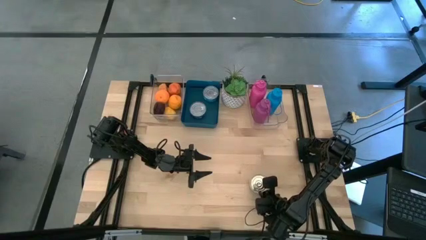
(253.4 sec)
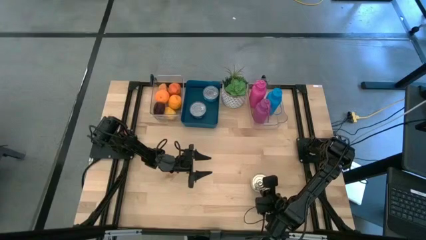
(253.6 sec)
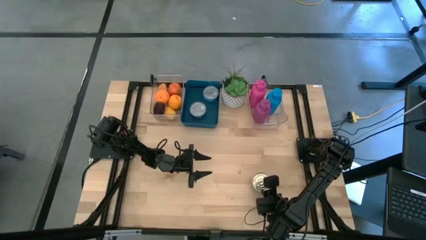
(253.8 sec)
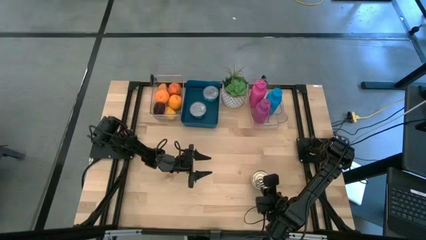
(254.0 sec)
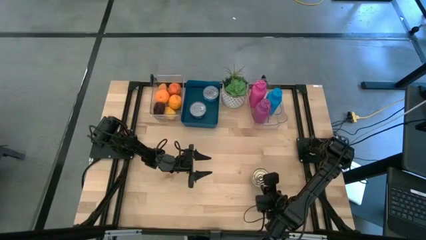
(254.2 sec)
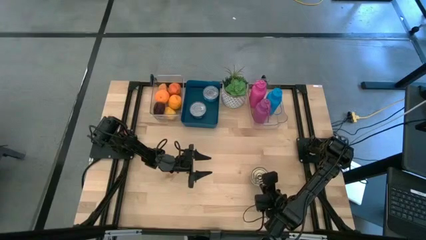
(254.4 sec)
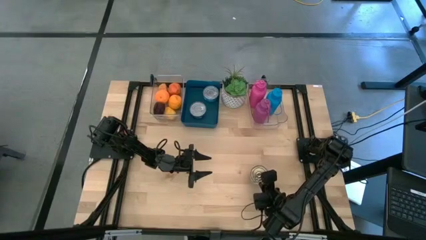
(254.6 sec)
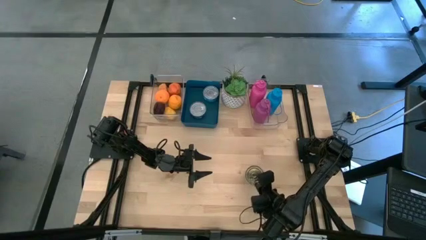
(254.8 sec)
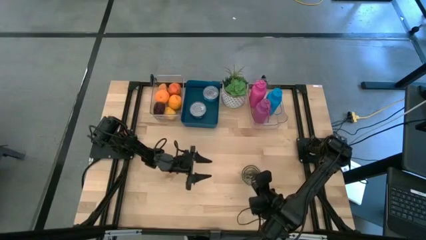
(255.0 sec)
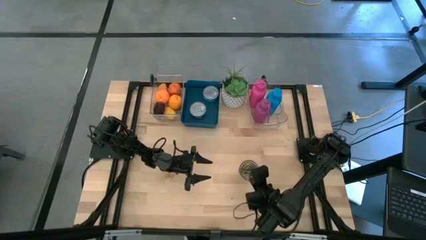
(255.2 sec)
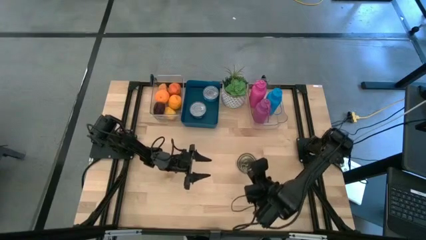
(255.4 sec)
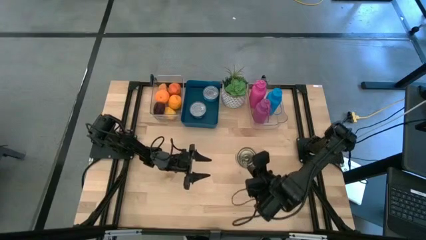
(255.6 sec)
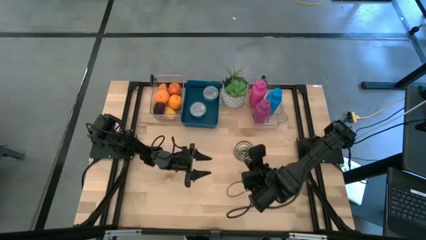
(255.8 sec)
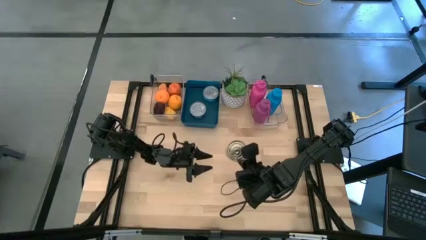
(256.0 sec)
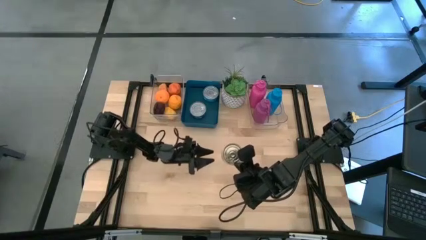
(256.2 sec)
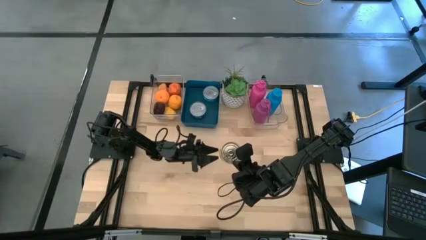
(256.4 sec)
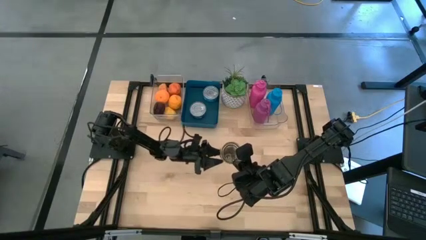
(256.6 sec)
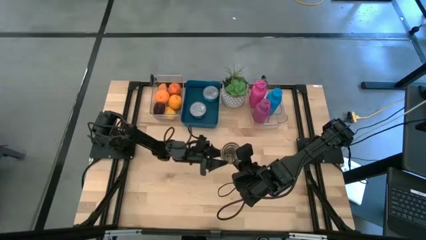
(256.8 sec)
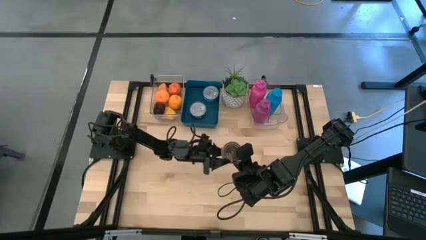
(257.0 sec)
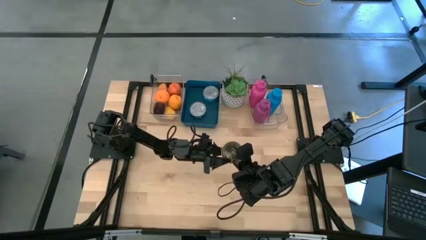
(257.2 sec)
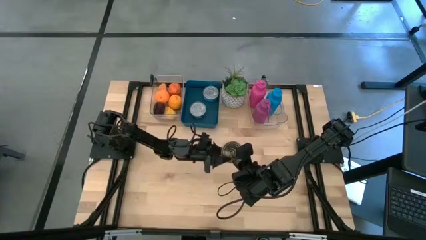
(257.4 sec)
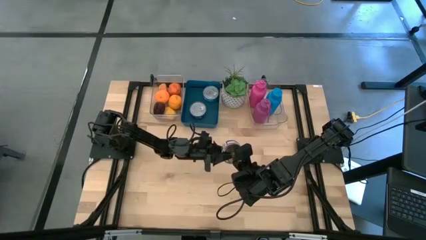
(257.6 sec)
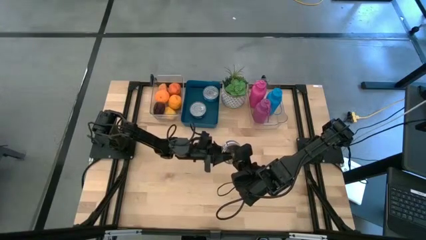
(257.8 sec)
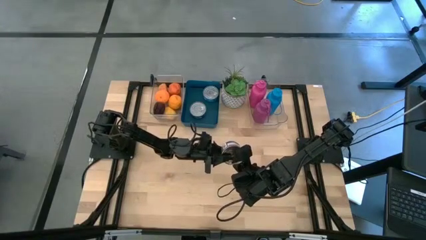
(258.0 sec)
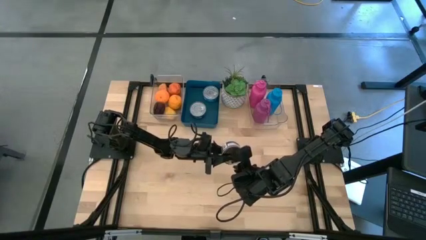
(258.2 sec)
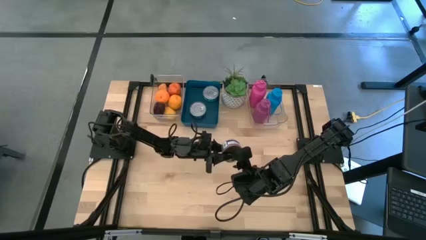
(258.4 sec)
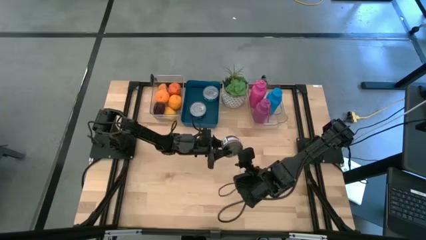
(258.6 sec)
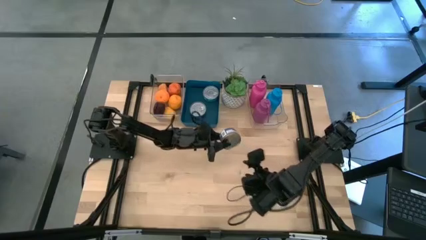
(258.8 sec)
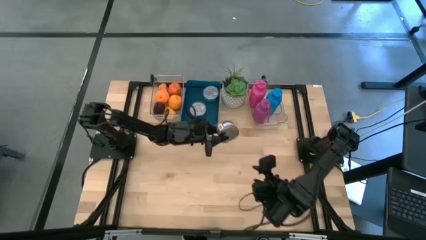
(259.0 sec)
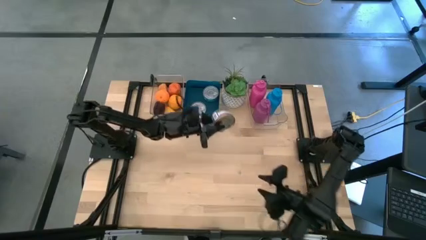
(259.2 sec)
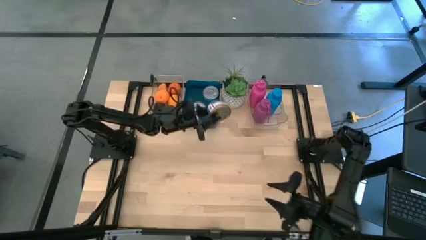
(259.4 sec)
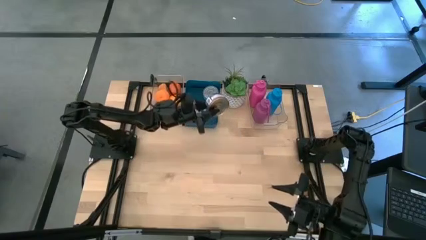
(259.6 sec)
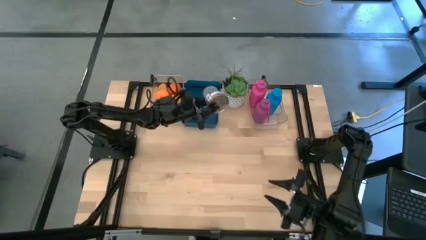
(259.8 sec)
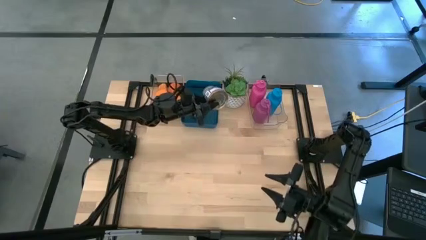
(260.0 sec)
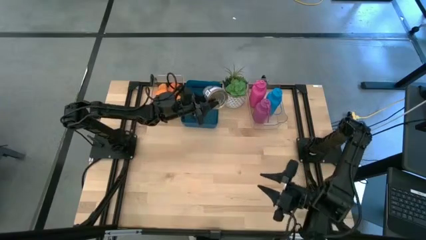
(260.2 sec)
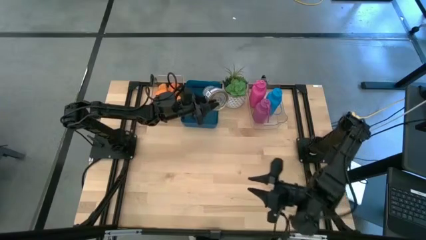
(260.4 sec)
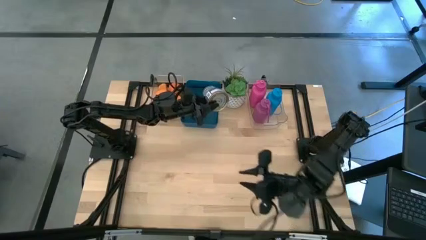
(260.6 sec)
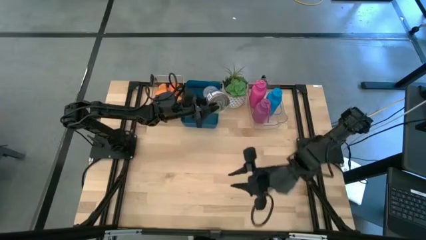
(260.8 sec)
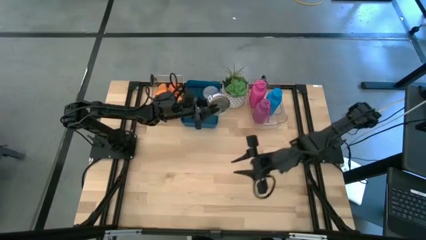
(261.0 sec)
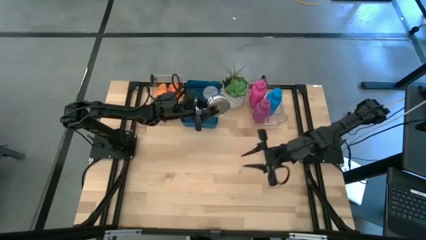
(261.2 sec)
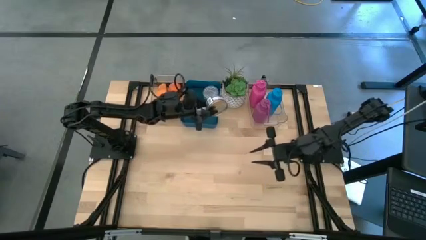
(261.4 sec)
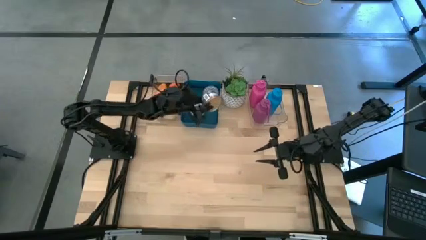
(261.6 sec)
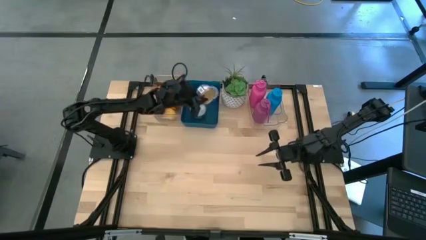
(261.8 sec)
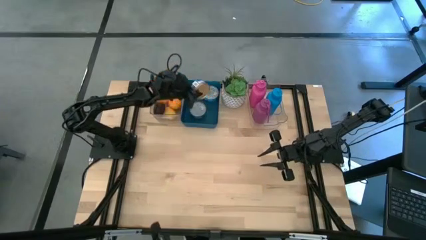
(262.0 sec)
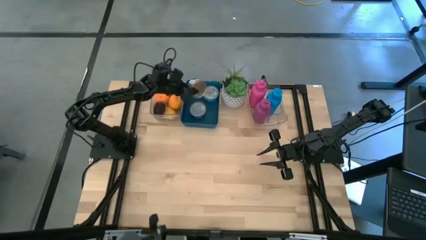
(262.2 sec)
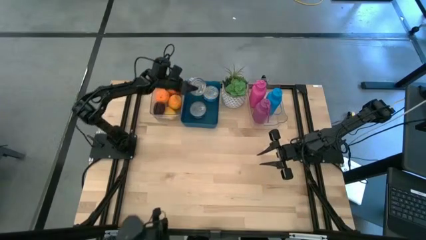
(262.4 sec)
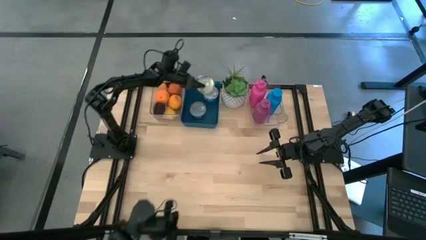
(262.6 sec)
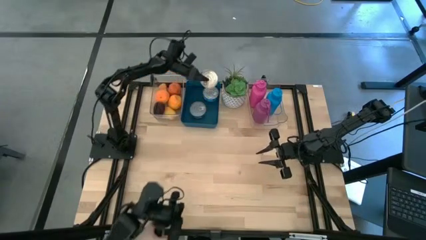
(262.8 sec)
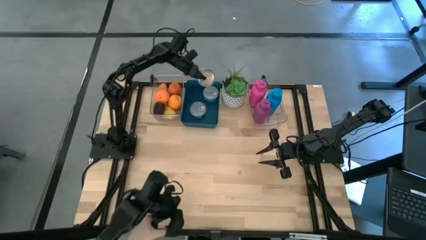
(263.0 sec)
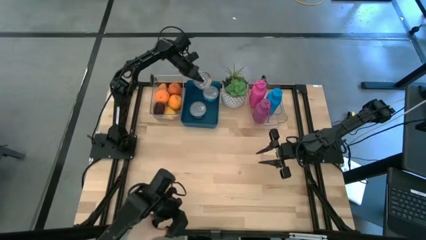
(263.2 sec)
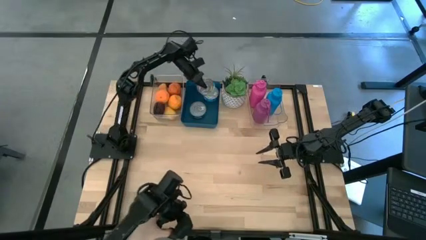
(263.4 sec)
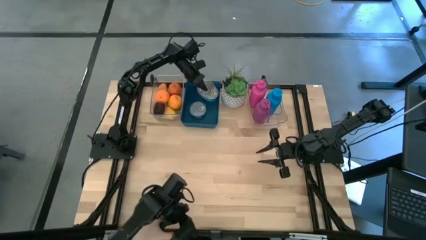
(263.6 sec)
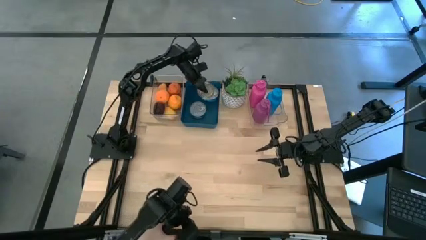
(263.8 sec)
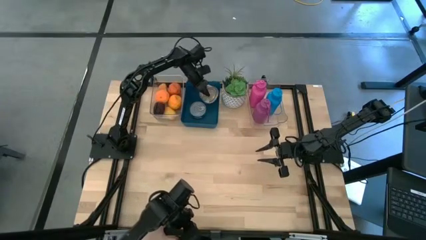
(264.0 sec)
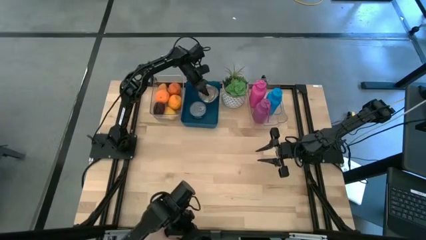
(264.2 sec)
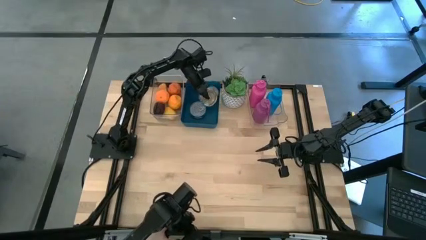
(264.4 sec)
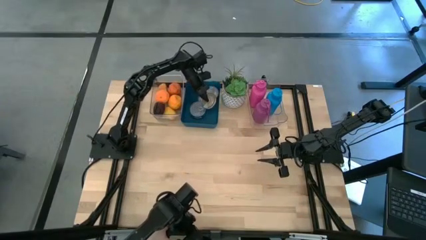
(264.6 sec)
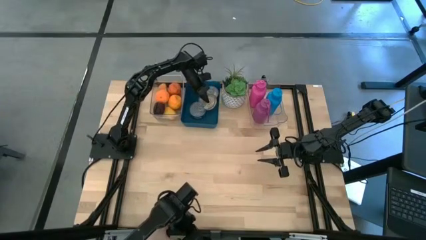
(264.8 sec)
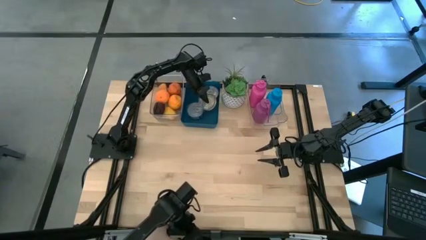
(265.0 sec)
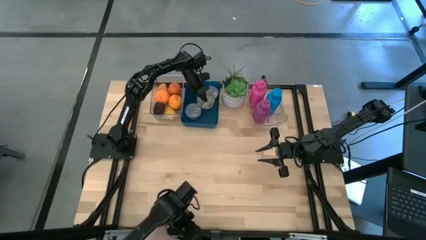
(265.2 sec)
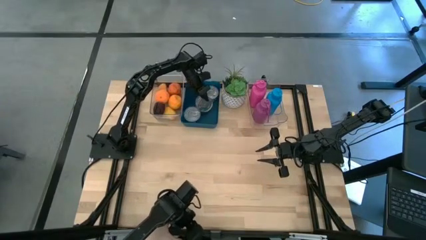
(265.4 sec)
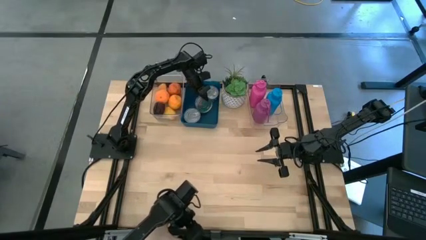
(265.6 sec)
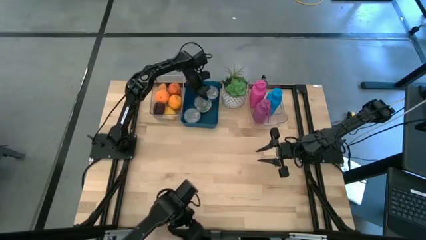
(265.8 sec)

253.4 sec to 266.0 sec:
Task: Pick & Place Food Item
Put the blue and pink tuna can into the blue bin

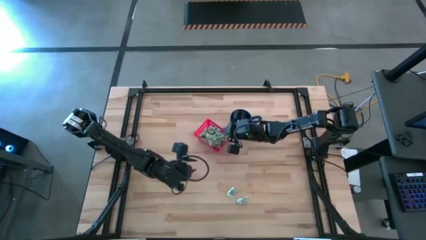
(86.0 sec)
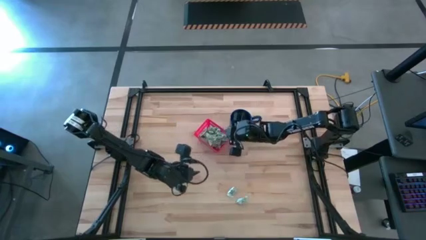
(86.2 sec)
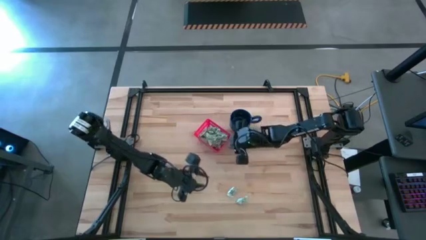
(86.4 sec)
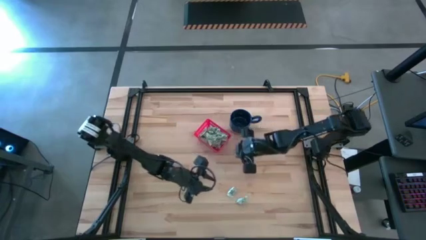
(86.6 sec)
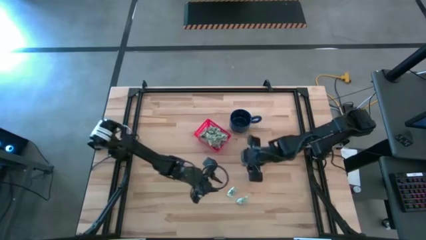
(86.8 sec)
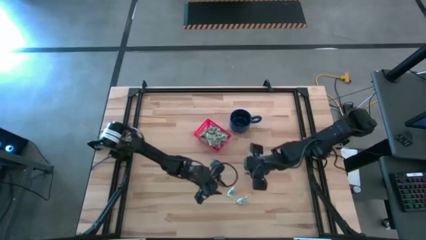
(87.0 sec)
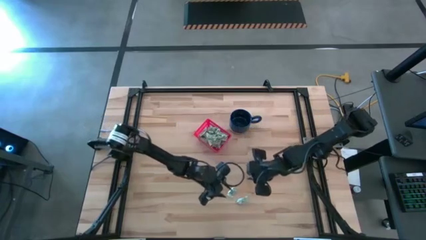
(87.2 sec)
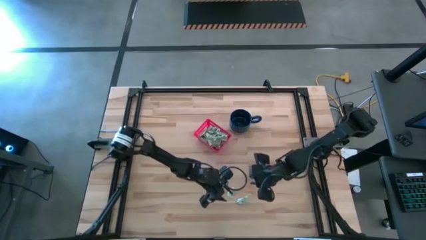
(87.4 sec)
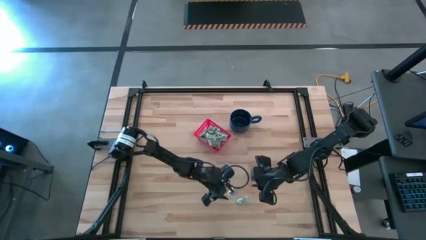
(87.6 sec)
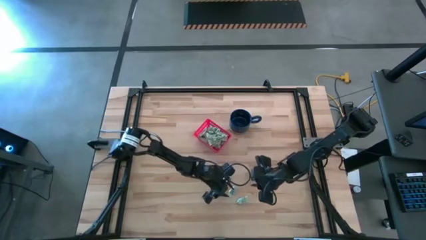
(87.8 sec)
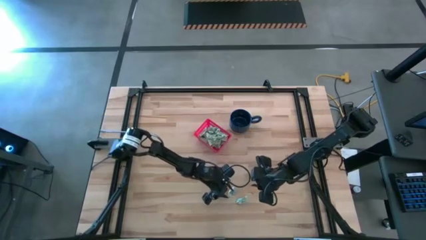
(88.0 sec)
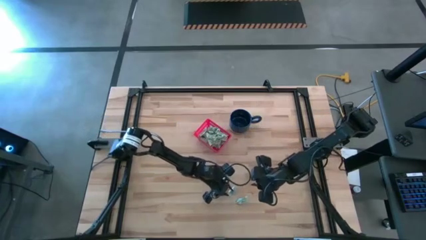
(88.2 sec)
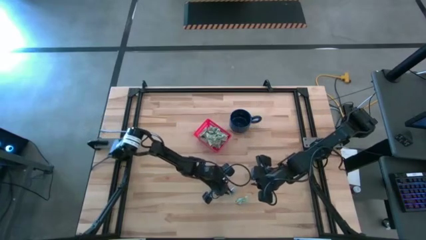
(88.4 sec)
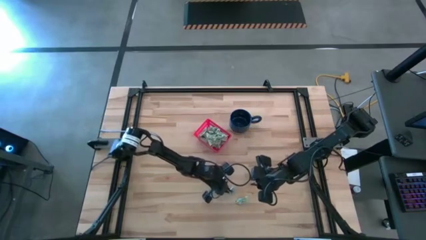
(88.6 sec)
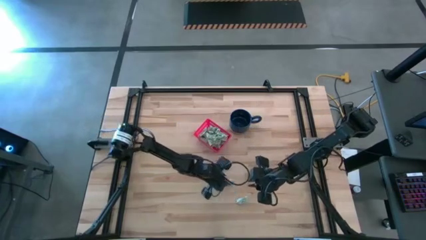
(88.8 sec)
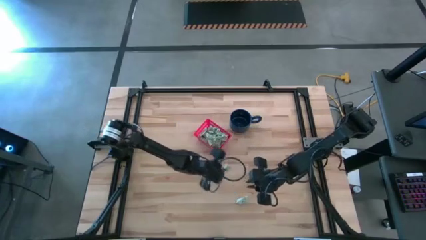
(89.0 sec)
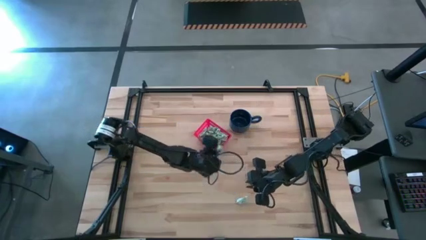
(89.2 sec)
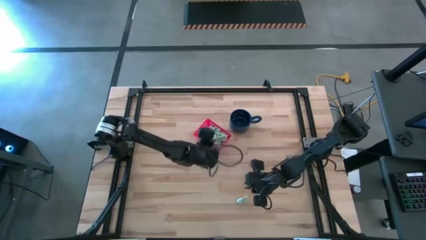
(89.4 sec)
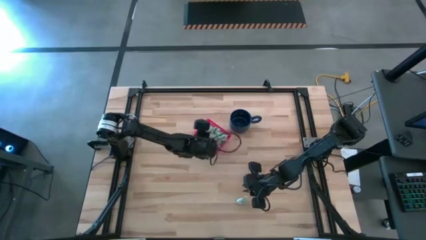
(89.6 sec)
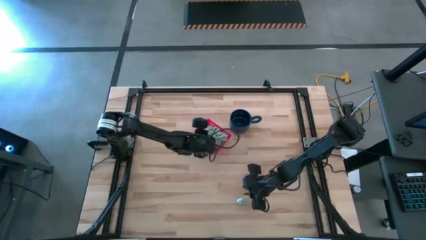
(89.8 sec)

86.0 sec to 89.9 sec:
Task: Pick and place items into bin
Put the top stevia packet into the bin
